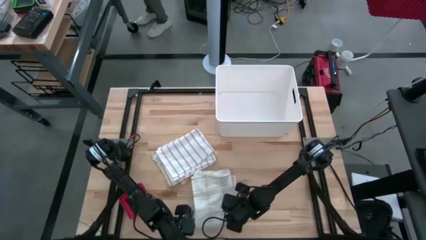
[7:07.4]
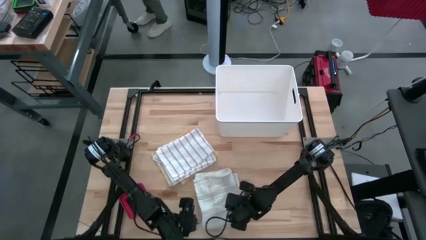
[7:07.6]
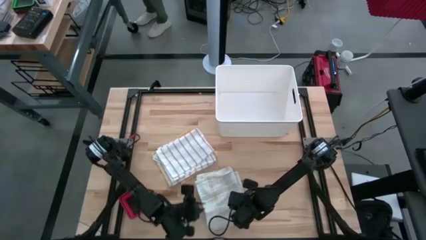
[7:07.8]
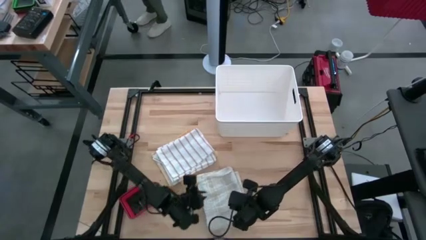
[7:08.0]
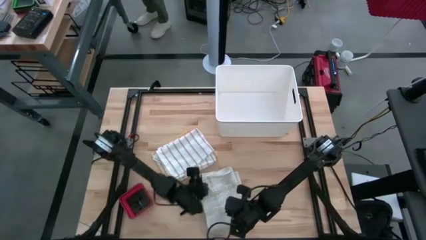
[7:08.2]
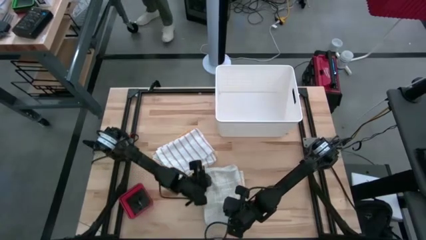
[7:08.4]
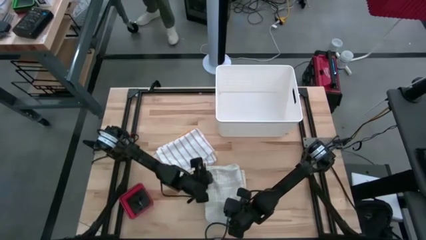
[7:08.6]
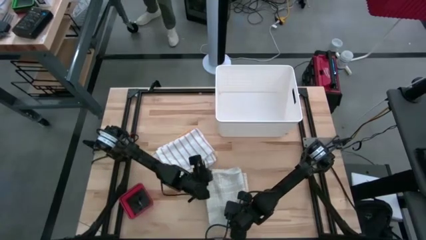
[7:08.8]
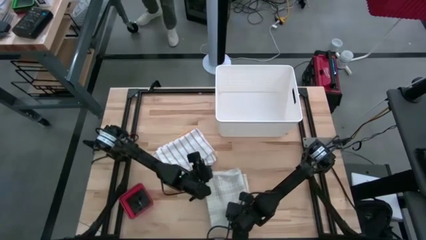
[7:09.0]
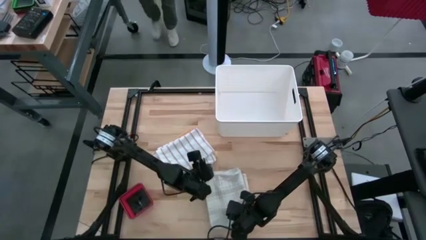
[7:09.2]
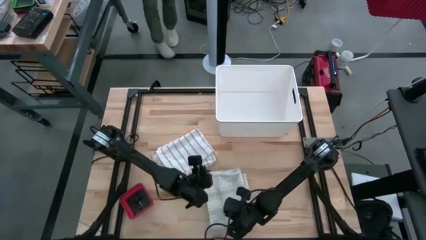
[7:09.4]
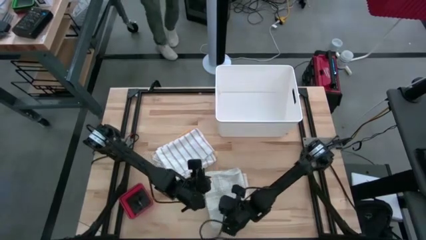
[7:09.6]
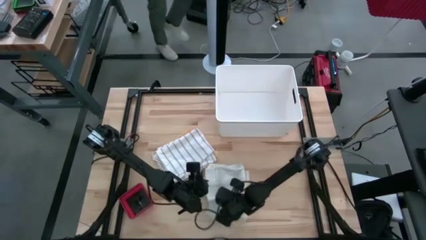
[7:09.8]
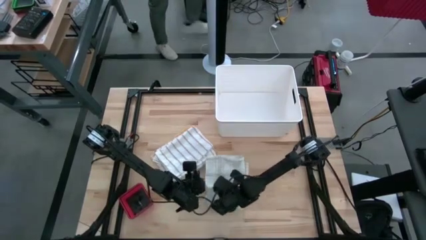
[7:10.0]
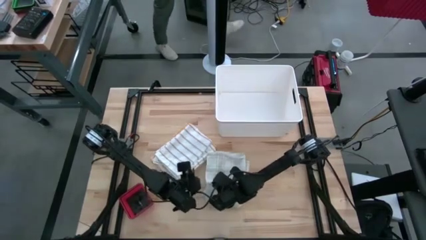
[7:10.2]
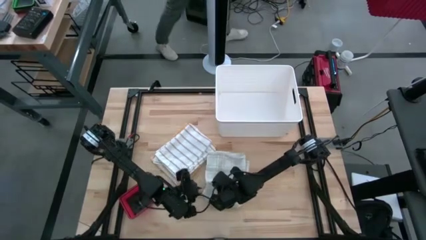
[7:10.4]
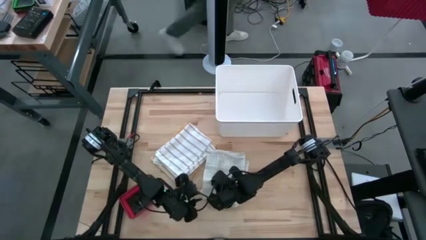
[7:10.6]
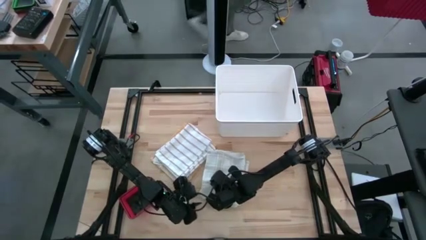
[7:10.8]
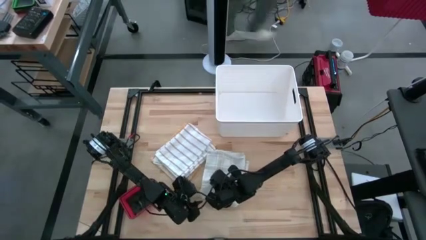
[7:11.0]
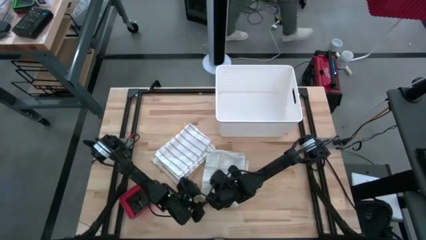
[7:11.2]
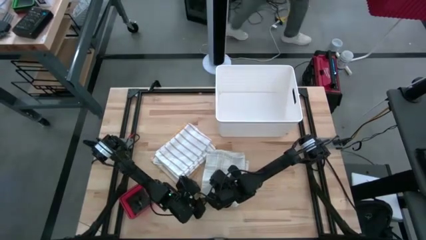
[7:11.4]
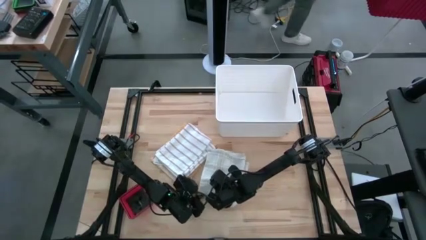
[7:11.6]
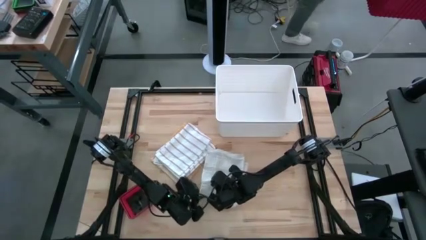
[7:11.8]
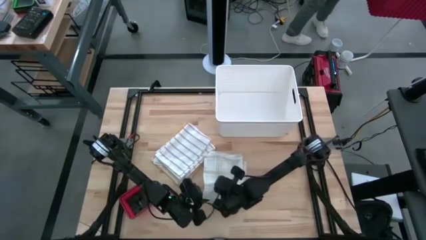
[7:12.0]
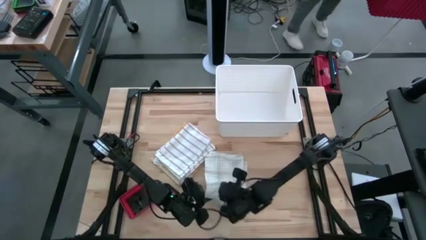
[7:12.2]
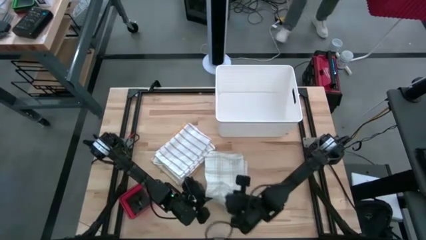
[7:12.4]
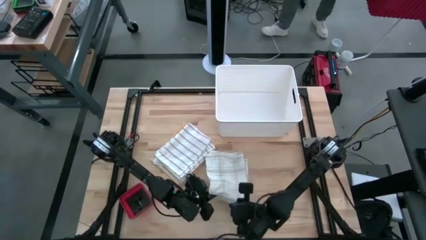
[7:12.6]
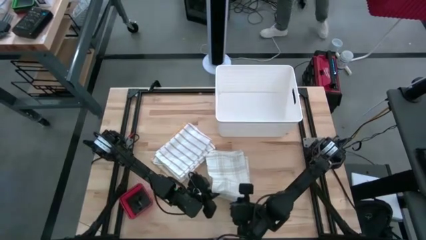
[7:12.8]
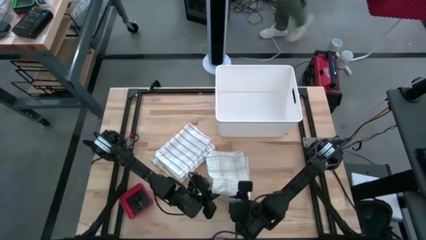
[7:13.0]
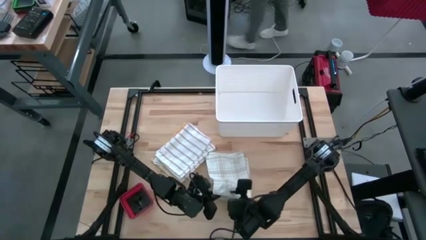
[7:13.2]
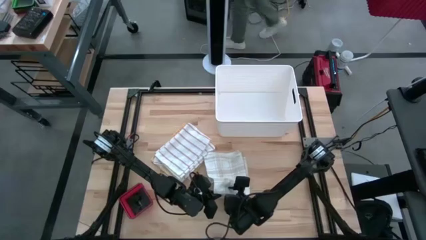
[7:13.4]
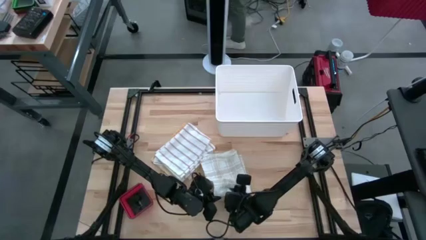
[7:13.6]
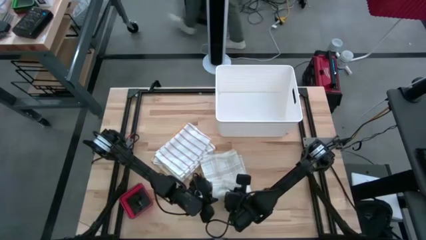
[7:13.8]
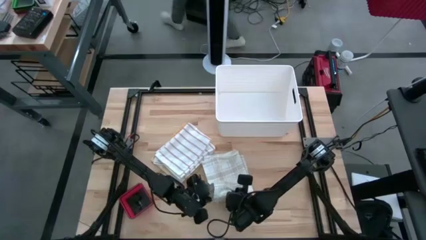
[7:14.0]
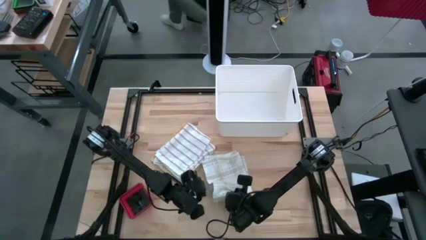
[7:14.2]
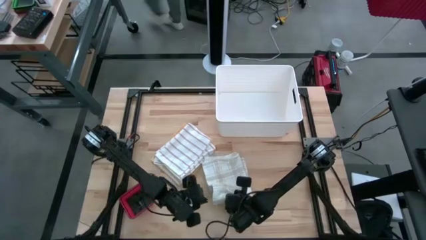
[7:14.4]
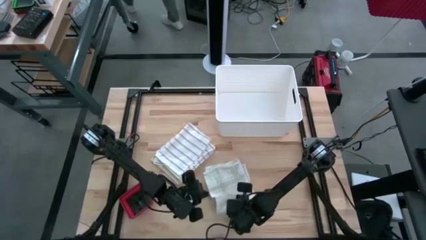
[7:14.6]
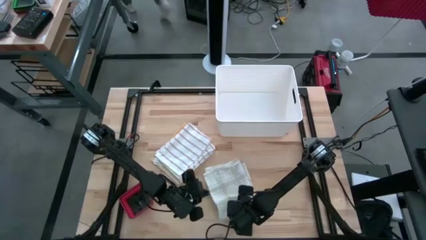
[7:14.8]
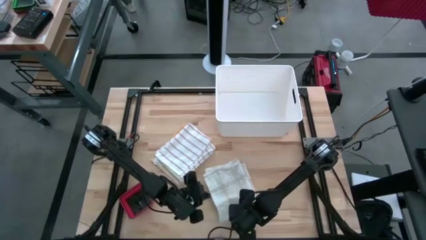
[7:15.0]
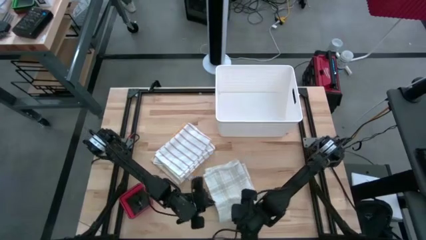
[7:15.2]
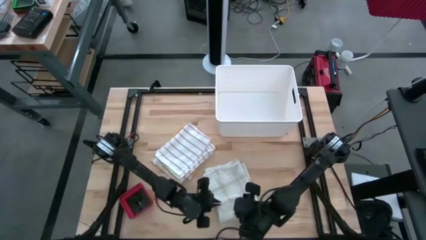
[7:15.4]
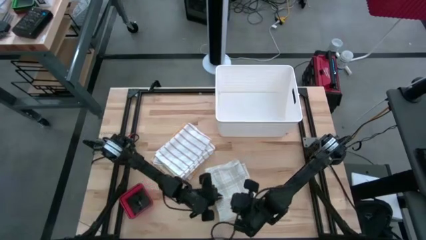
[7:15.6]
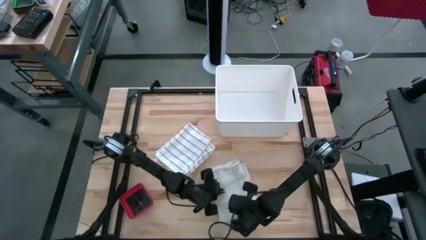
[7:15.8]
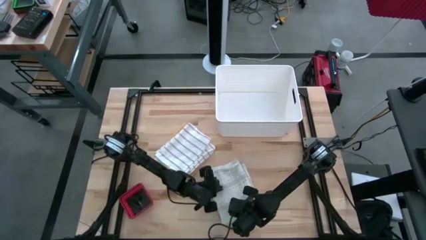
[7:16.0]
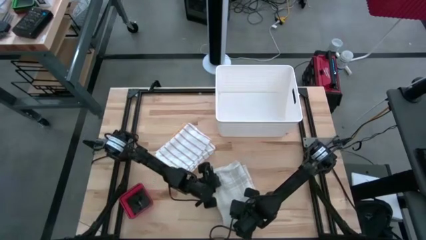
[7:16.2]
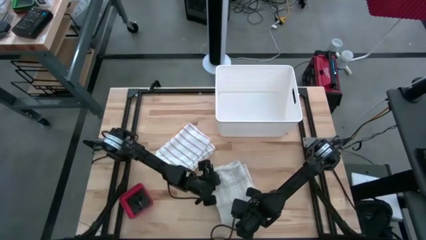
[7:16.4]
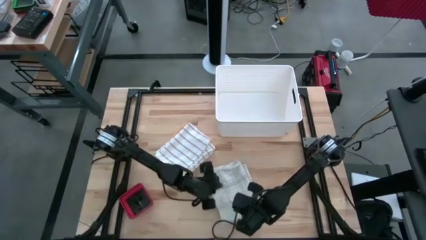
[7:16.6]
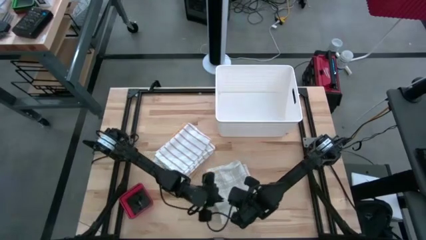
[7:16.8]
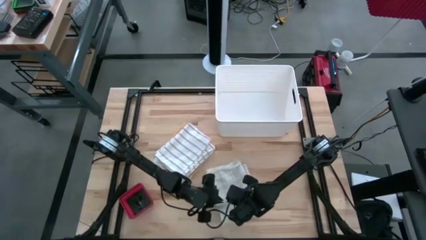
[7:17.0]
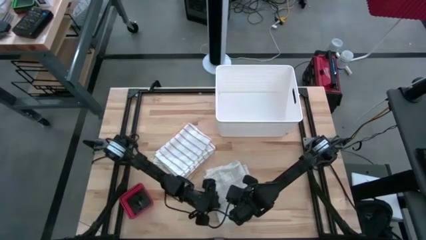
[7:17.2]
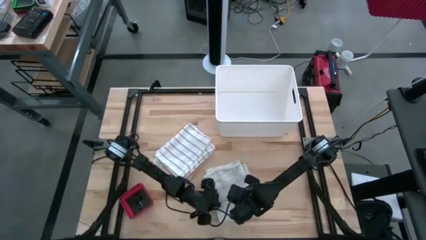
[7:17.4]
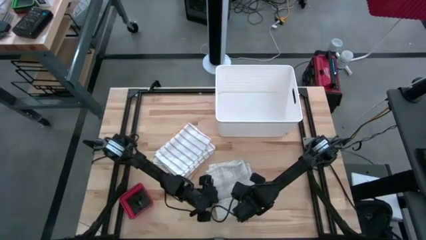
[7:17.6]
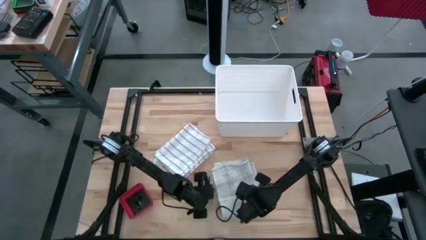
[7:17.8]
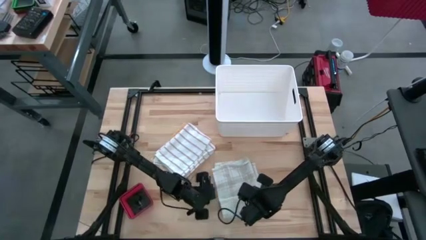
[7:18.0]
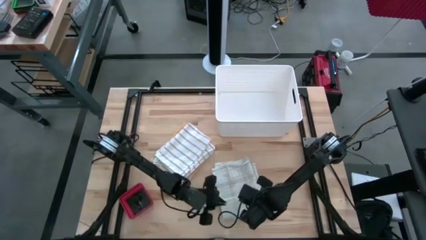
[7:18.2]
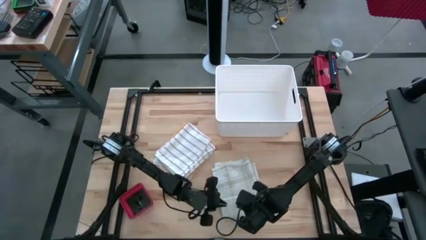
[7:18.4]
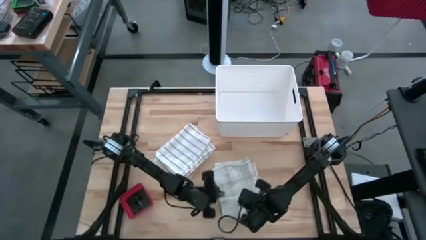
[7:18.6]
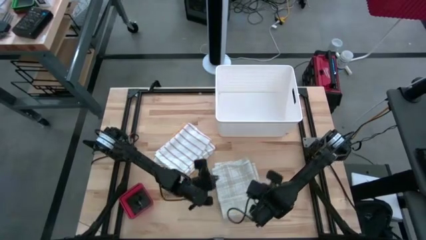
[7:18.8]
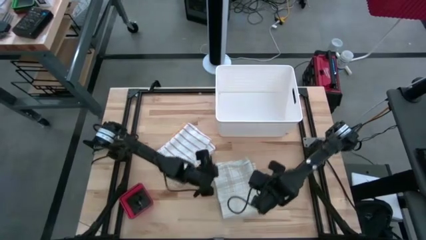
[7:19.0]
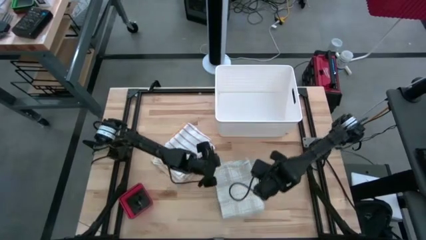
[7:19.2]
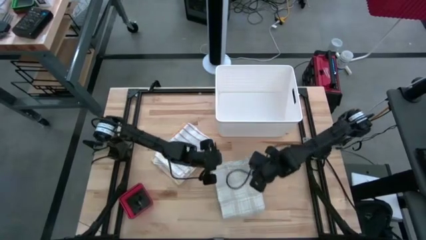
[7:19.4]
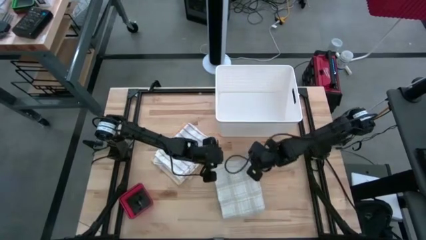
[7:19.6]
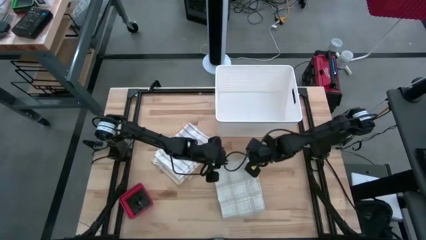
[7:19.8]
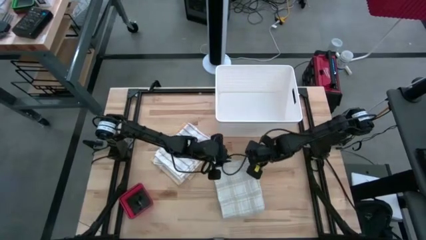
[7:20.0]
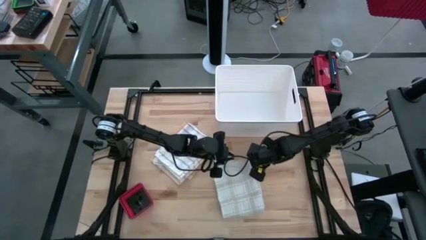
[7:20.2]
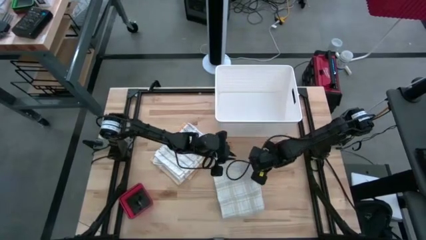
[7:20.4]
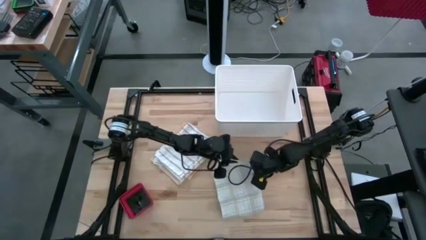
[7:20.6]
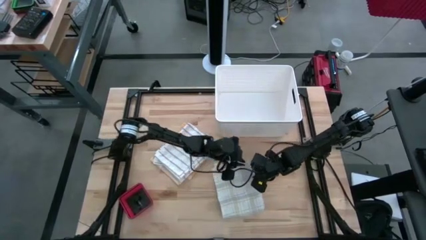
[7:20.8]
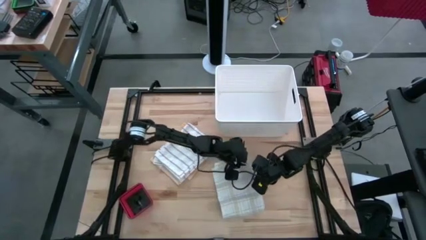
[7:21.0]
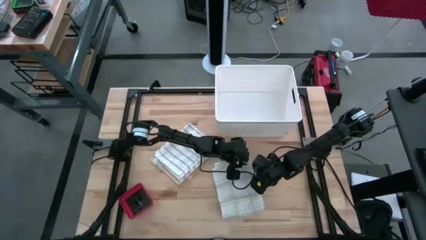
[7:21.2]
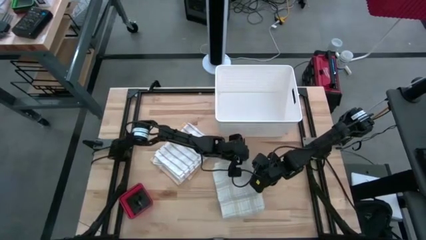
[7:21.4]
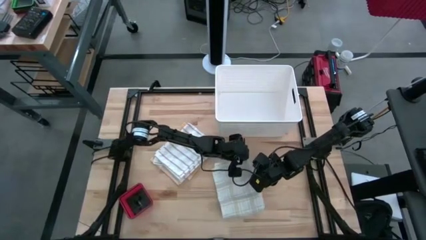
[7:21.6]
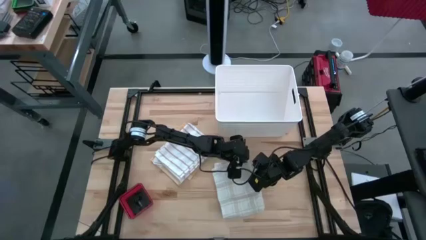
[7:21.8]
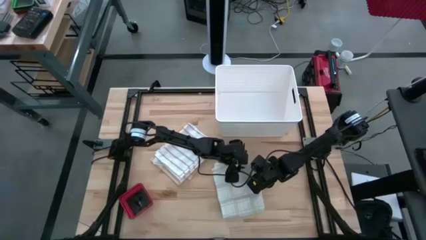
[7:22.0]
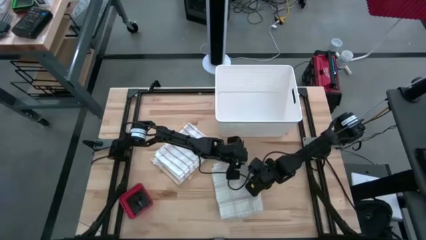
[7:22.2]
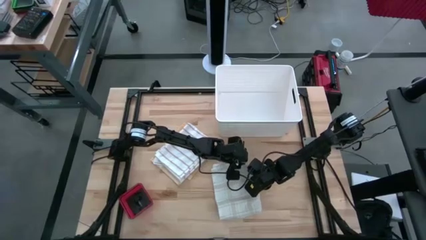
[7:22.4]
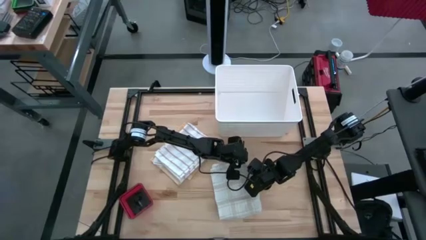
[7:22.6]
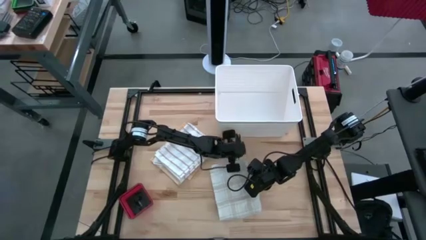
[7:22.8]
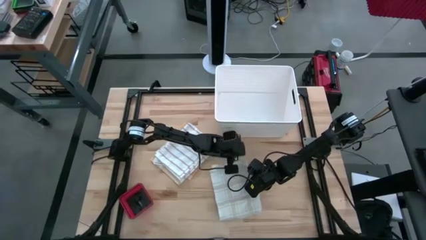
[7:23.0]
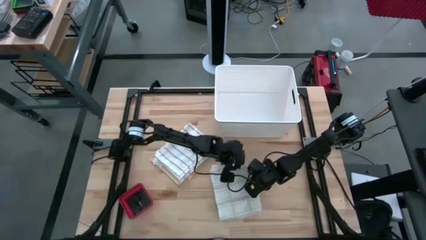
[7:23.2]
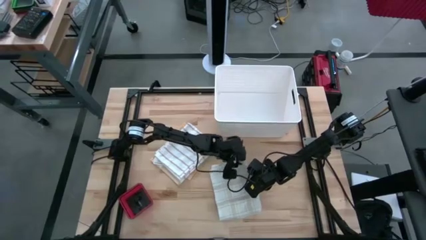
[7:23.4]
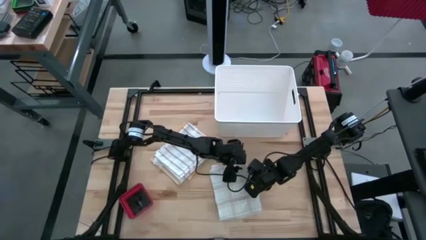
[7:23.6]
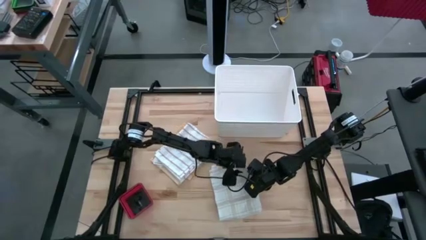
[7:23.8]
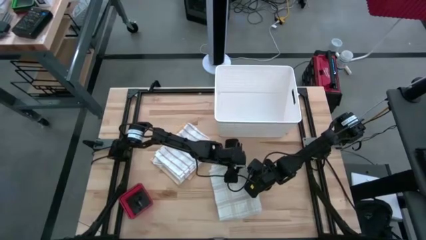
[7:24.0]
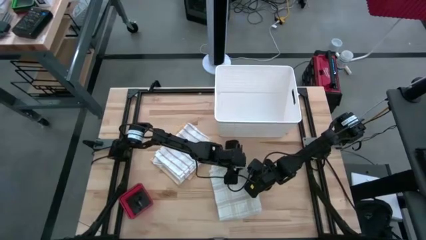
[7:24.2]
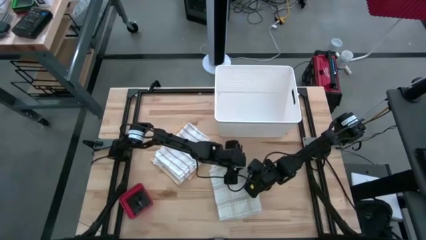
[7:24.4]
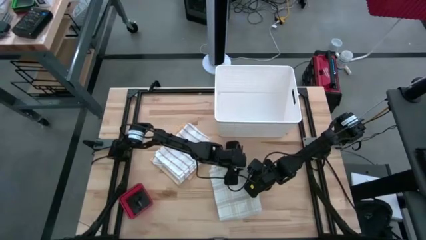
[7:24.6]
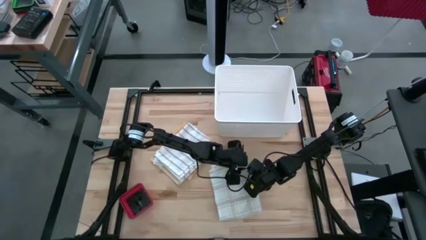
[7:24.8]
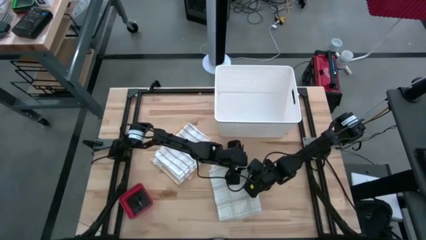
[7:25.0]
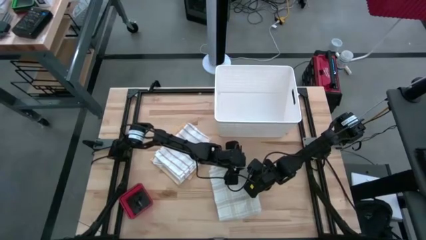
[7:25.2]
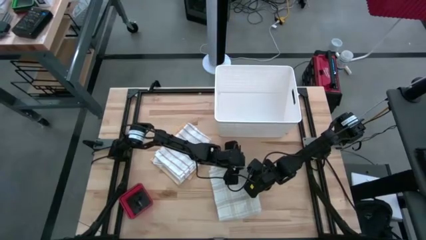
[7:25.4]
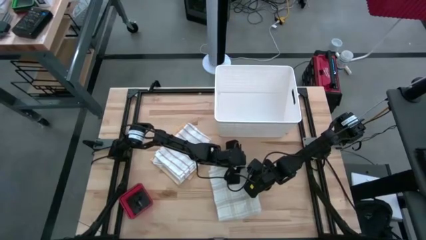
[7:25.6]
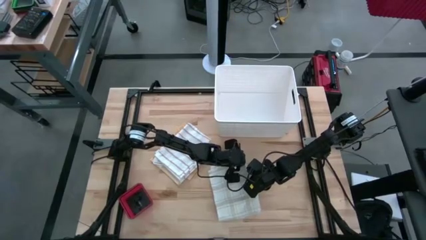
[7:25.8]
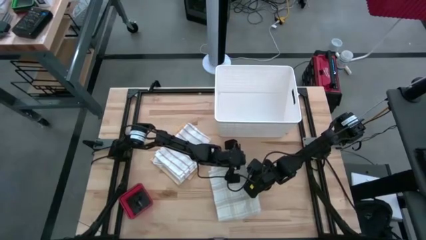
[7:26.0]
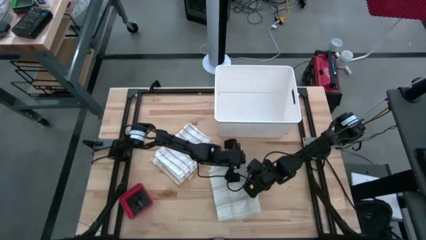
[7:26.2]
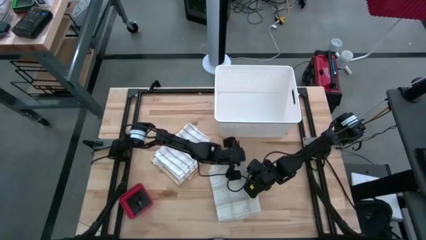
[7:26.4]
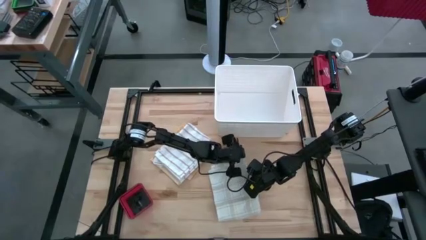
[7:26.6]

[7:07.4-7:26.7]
Task: Fold towel
Fold the light gray patterned towel
